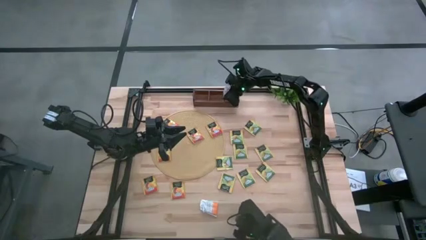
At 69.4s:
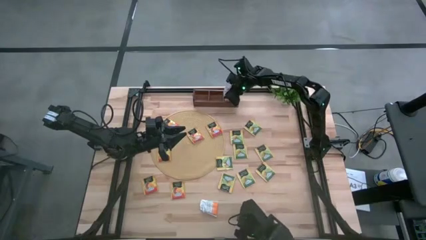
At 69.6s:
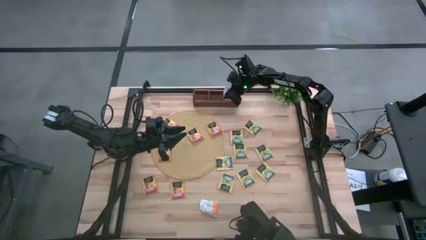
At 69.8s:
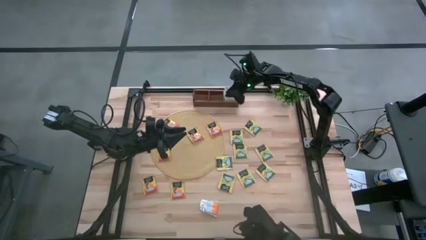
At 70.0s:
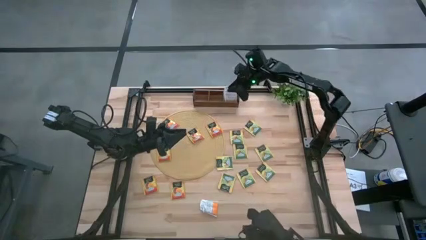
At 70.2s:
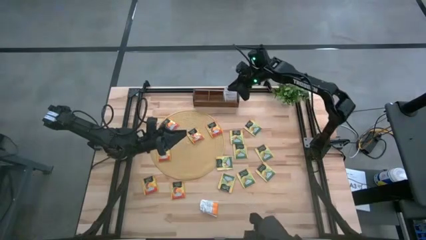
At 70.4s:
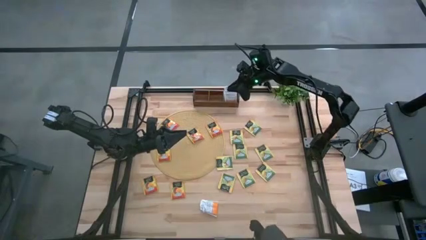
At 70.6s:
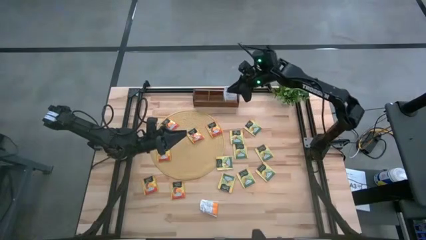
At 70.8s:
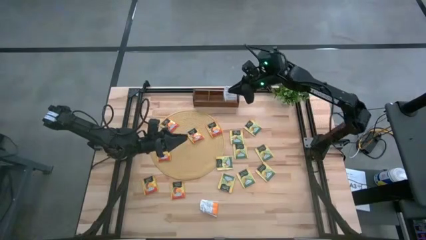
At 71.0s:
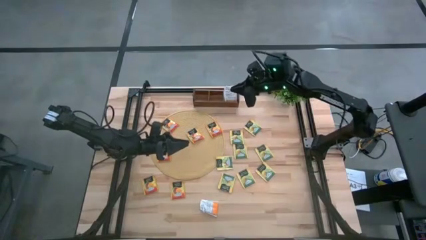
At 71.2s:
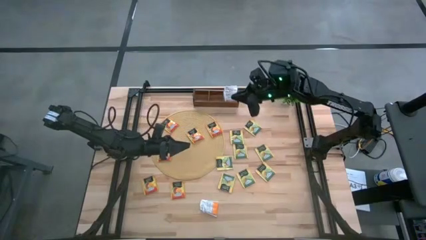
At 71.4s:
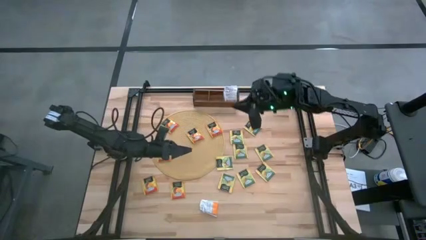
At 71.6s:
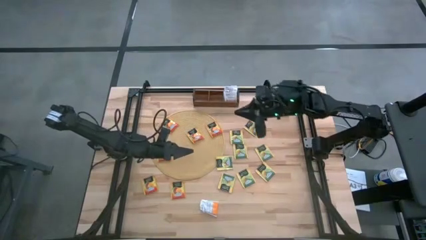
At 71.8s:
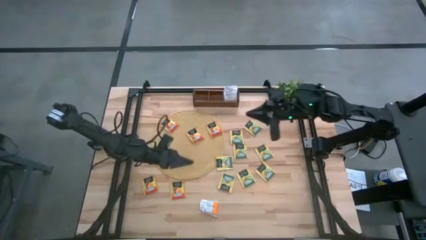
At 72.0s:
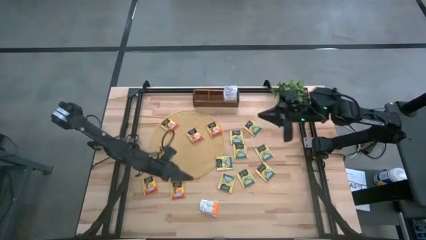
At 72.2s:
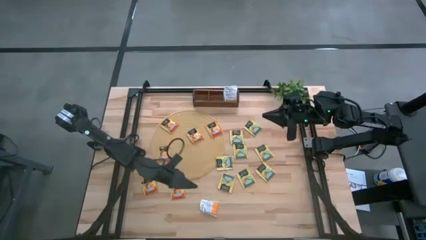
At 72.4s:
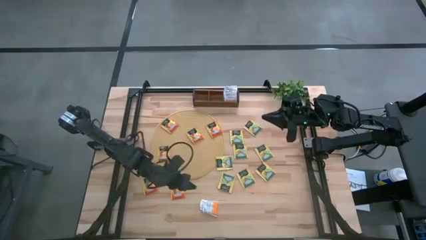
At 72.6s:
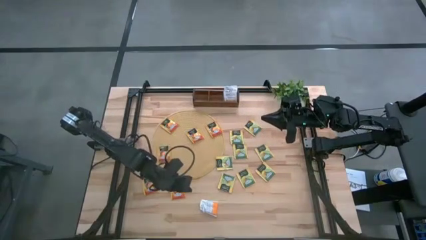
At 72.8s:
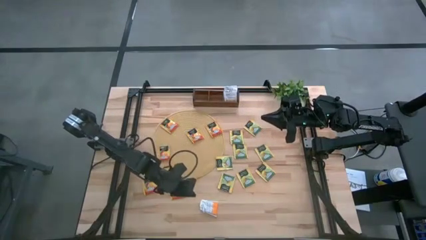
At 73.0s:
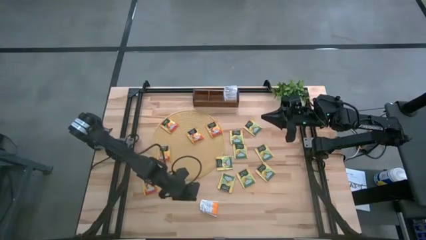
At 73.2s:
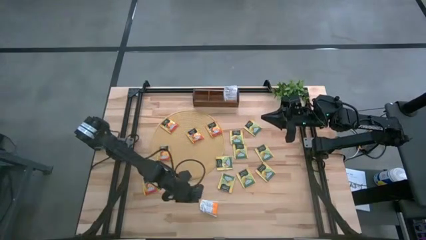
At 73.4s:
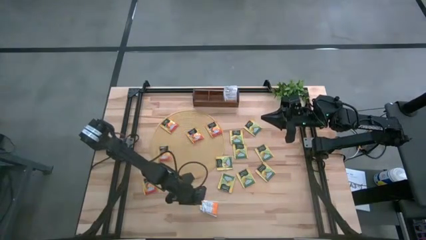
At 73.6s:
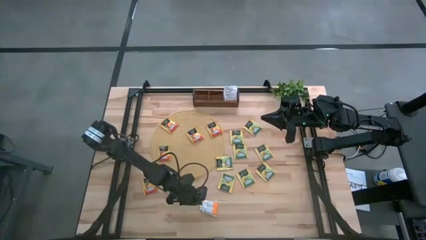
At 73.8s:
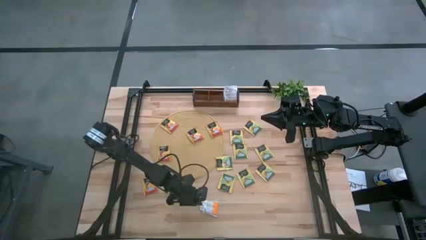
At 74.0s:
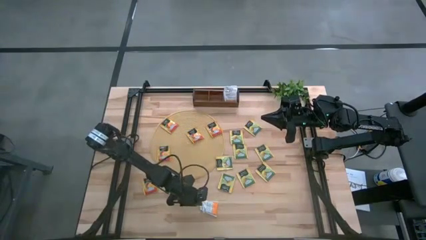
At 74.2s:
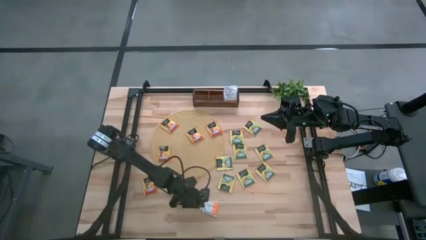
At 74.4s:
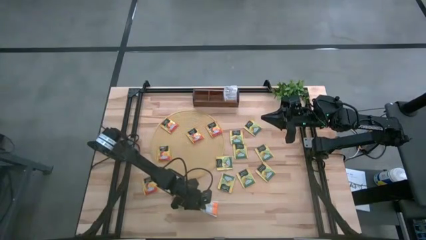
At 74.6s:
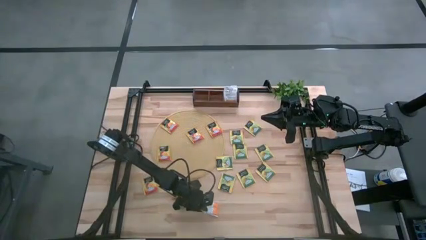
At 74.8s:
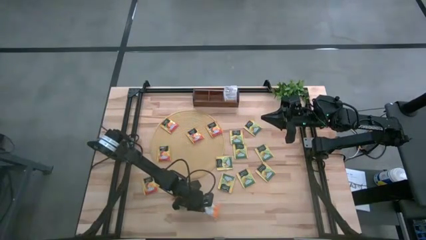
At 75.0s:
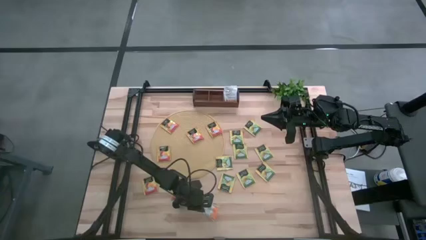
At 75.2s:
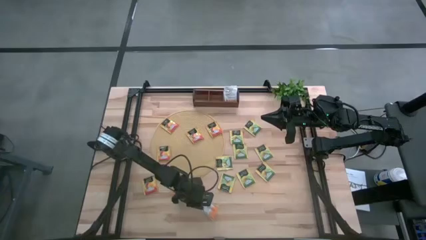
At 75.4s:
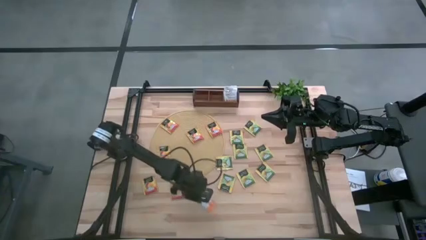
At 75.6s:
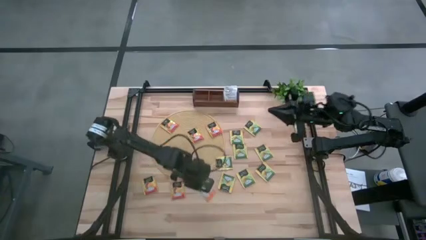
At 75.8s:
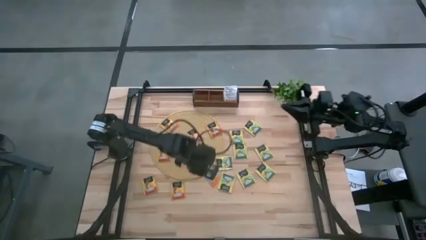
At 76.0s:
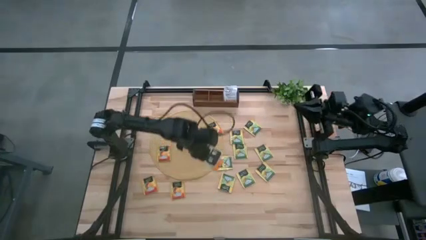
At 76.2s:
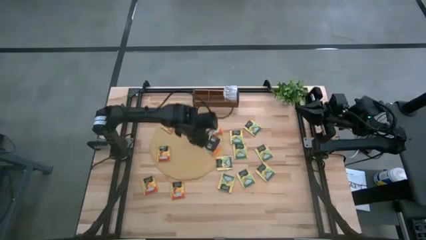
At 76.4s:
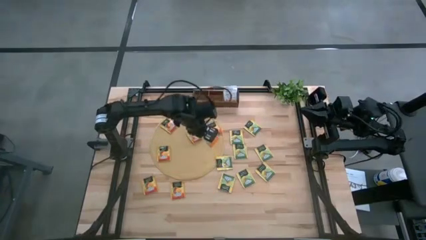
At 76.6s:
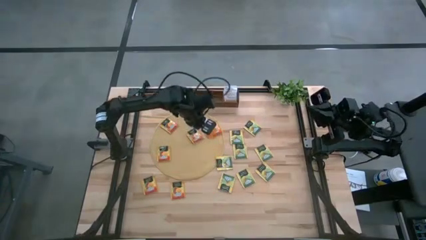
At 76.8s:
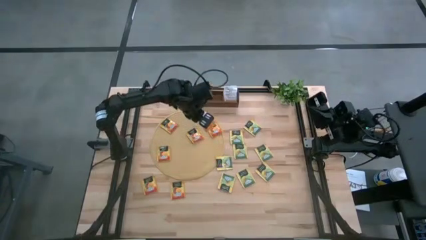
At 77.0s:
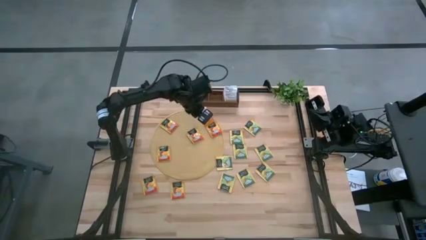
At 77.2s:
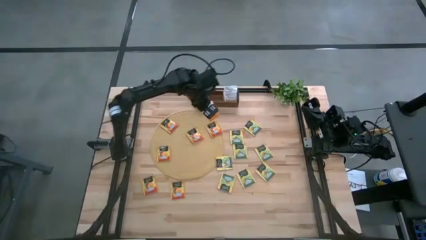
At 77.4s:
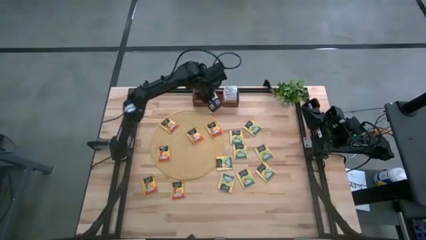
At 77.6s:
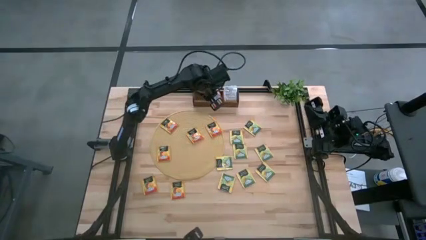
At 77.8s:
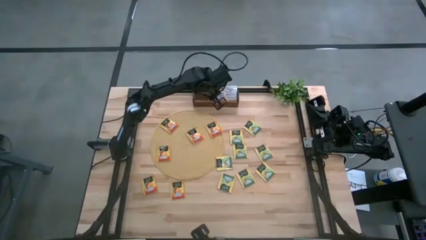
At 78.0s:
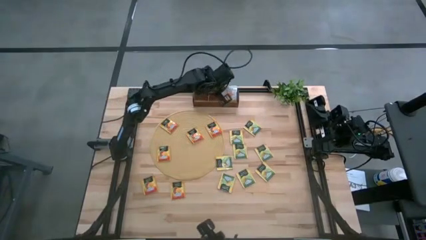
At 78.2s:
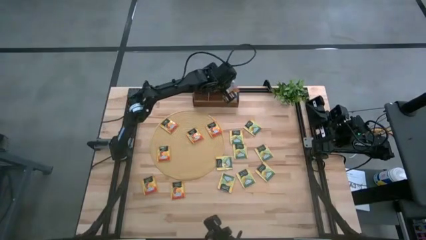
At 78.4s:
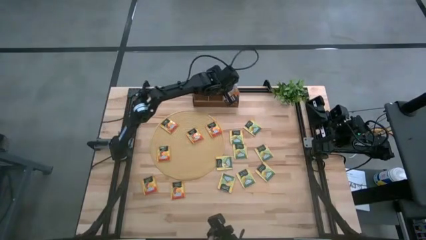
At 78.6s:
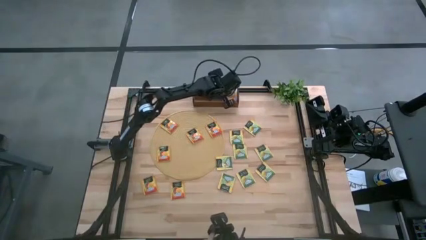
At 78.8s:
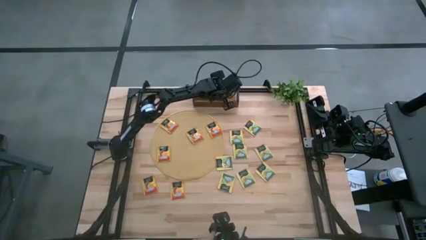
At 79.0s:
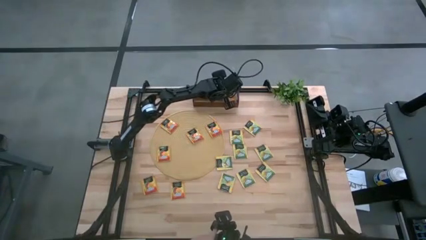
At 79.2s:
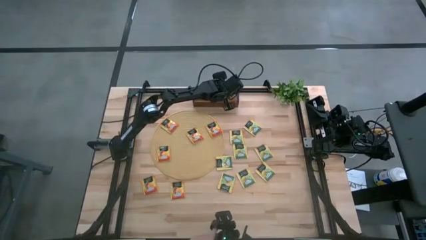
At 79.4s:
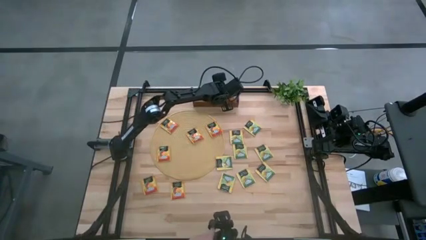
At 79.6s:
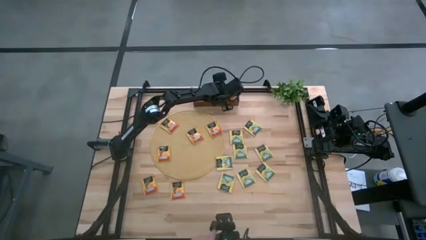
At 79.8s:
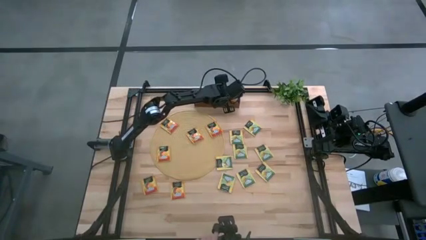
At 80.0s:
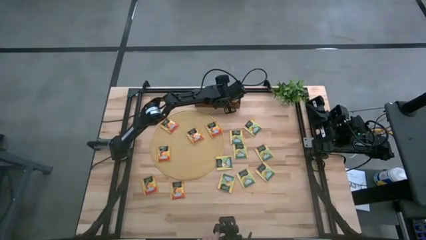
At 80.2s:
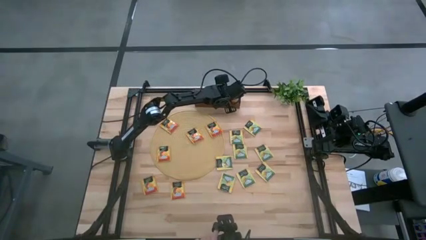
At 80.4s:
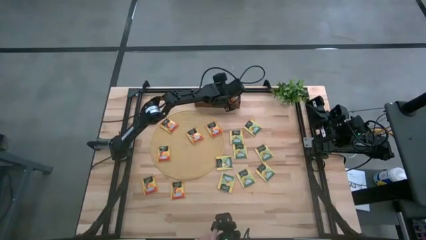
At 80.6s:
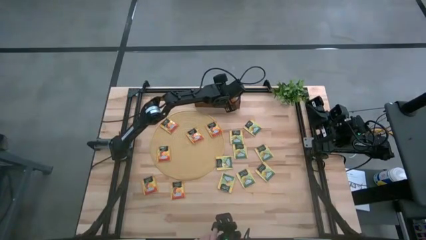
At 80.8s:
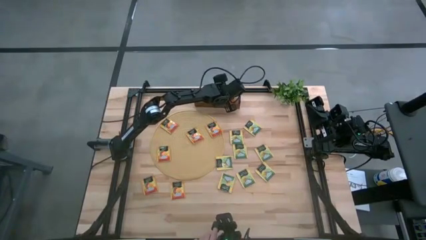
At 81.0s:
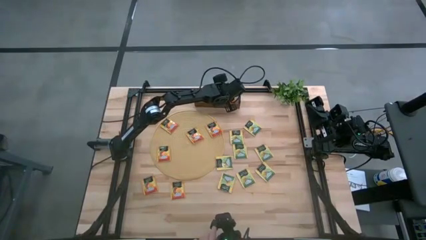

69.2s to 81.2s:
Task: Pick & Place Tea
Put the white tea bag into the right section of the wooden organizer

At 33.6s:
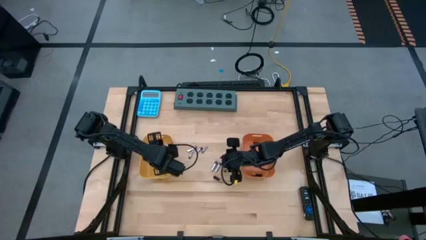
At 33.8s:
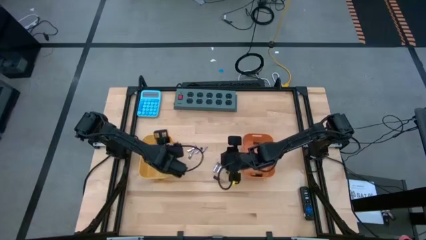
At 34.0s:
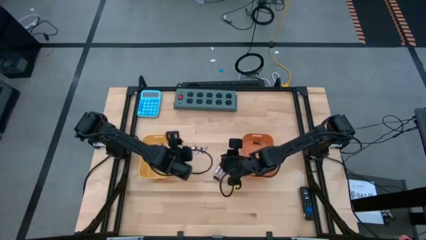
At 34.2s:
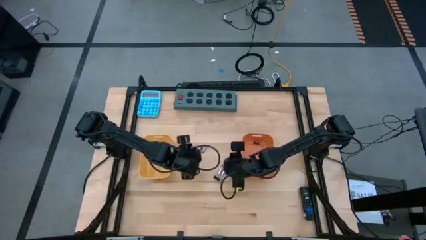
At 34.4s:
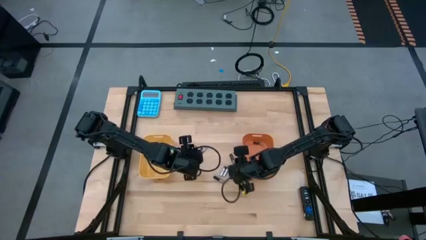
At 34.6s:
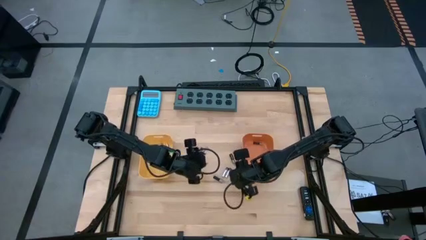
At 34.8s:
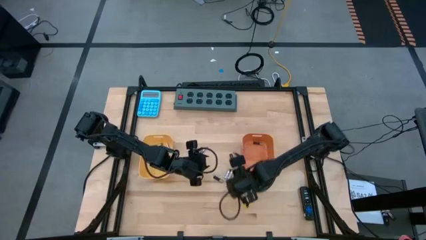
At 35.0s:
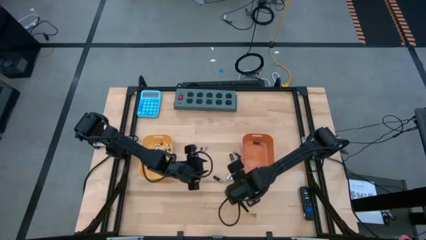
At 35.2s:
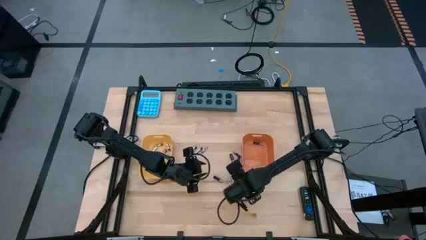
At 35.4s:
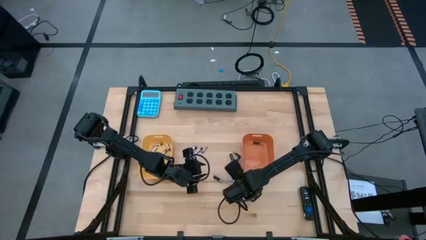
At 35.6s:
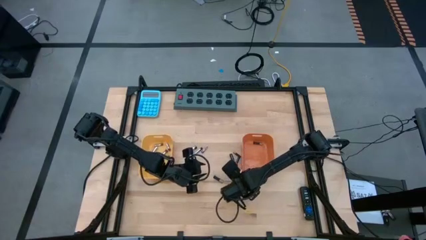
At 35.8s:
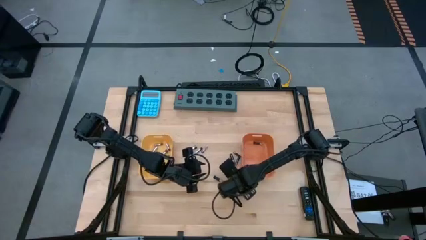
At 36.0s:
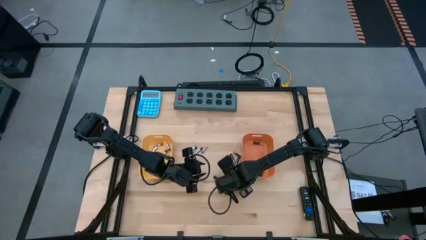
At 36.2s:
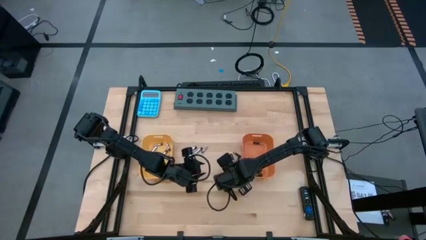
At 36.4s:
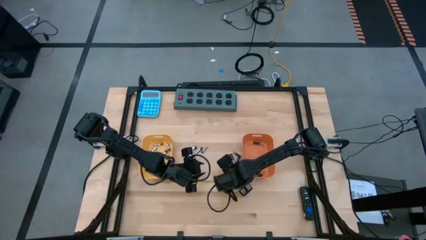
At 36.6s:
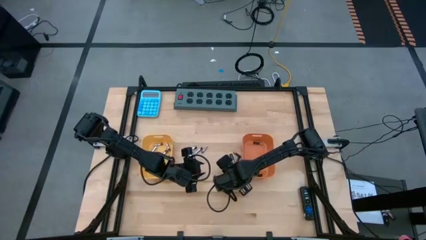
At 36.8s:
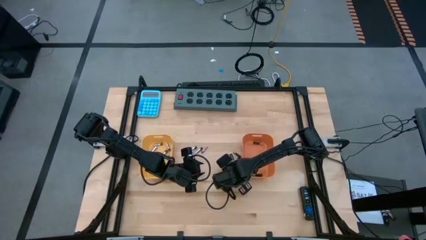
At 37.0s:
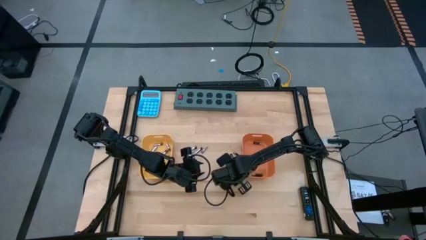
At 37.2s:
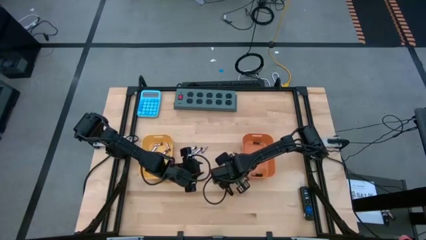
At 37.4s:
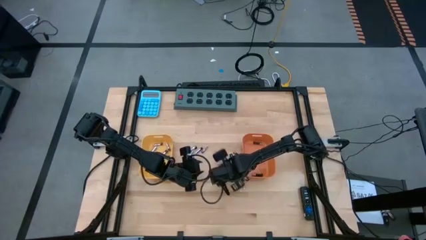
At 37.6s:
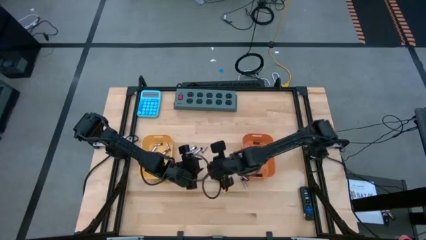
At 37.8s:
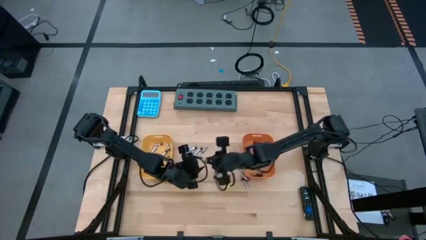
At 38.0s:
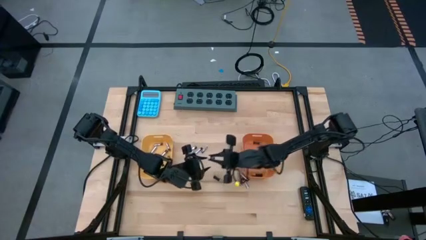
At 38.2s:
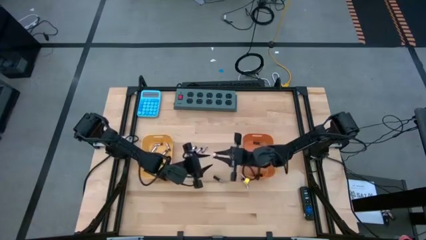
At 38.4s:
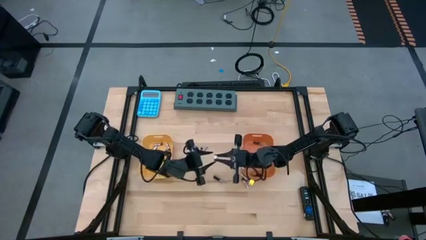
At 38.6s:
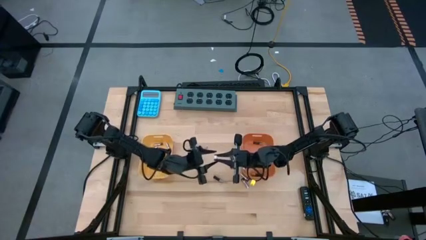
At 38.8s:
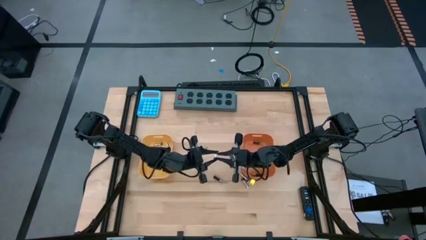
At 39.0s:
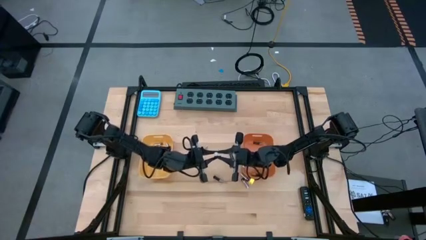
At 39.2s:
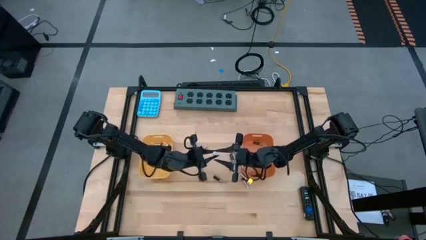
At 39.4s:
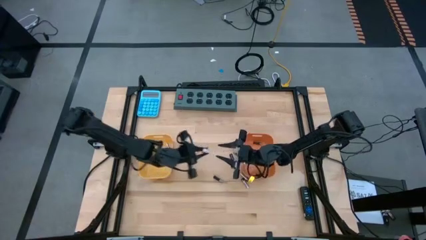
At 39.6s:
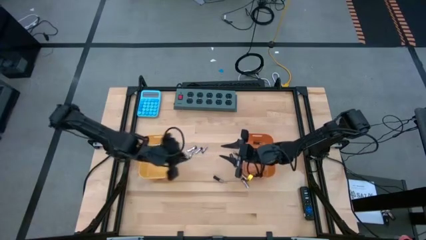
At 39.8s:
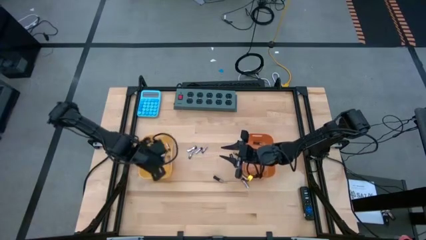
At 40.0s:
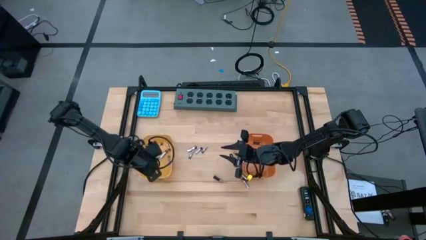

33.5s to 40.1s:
Task: Sort batteries
Put the silver battery into the yellow bin
